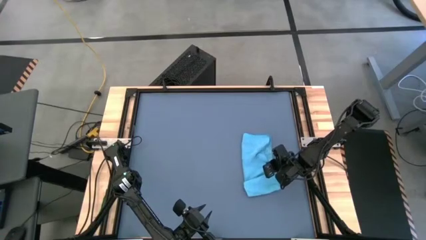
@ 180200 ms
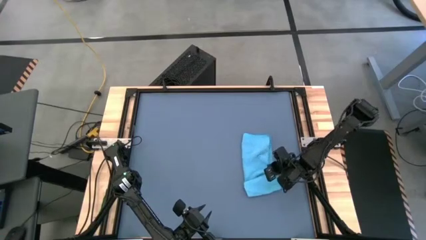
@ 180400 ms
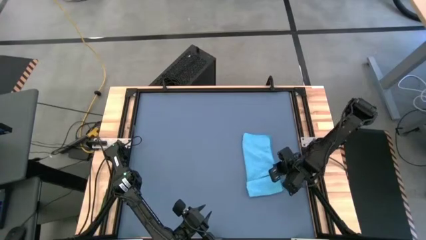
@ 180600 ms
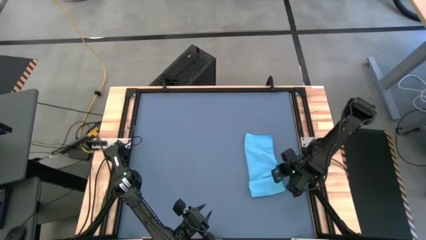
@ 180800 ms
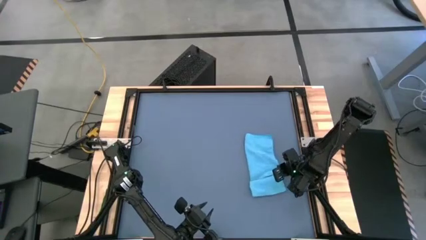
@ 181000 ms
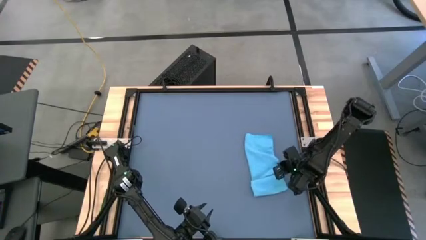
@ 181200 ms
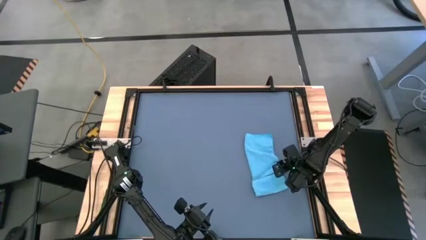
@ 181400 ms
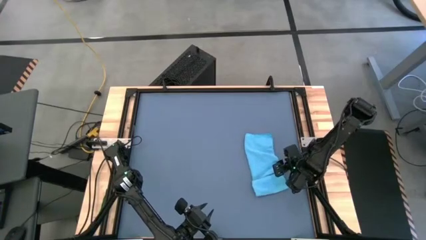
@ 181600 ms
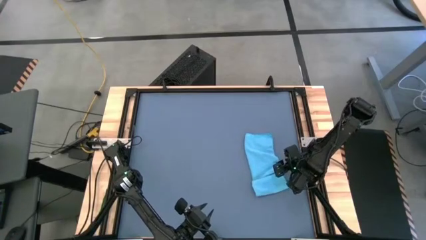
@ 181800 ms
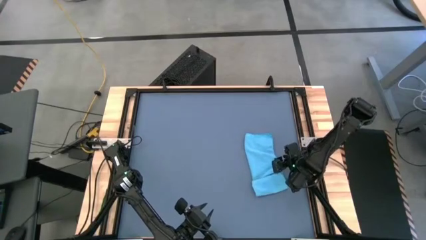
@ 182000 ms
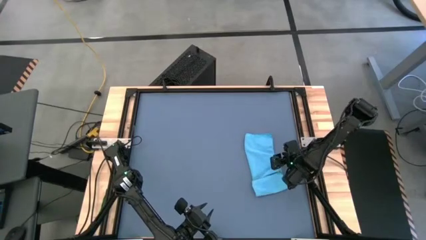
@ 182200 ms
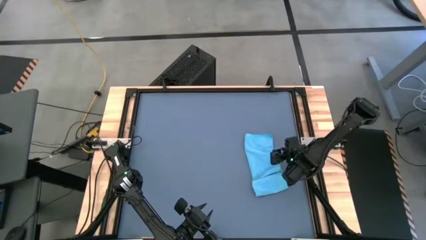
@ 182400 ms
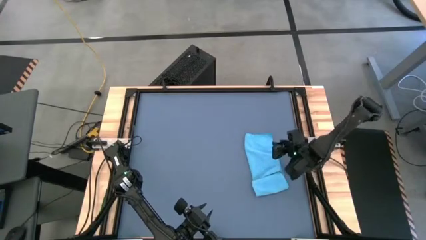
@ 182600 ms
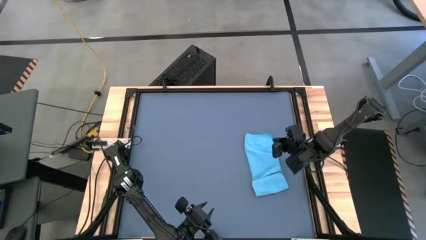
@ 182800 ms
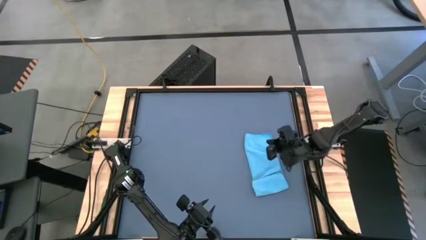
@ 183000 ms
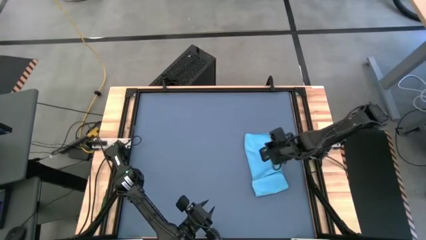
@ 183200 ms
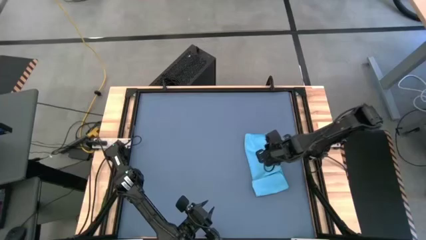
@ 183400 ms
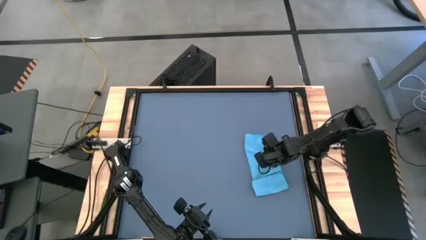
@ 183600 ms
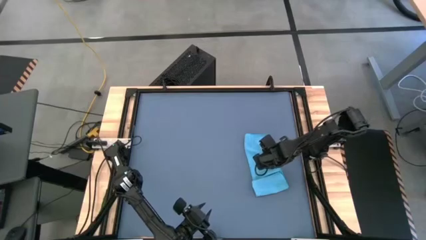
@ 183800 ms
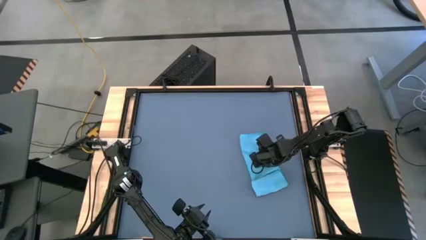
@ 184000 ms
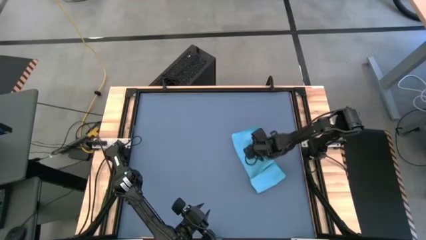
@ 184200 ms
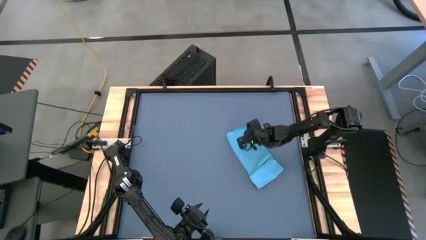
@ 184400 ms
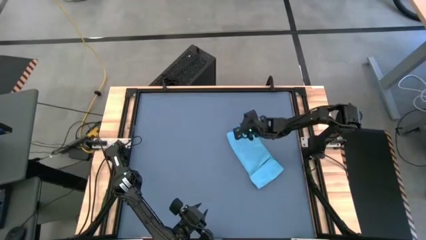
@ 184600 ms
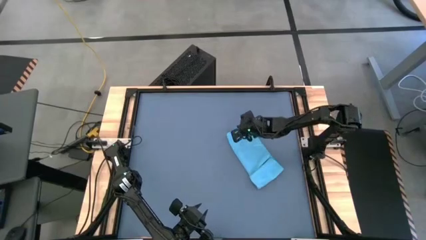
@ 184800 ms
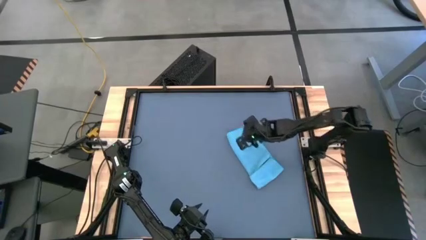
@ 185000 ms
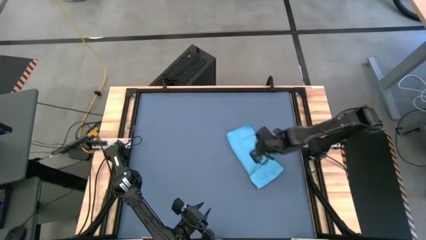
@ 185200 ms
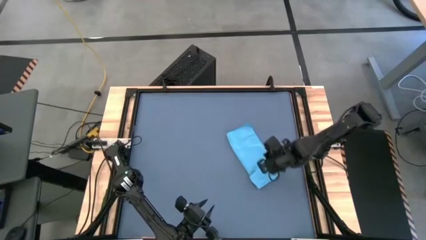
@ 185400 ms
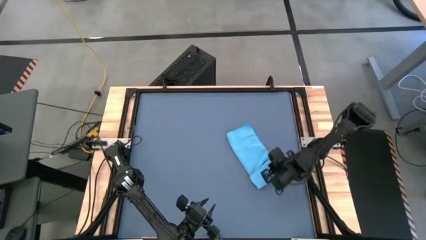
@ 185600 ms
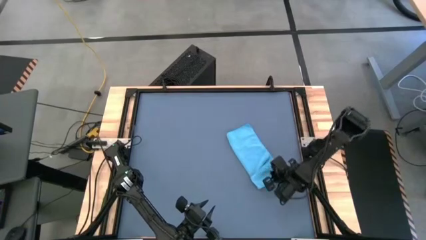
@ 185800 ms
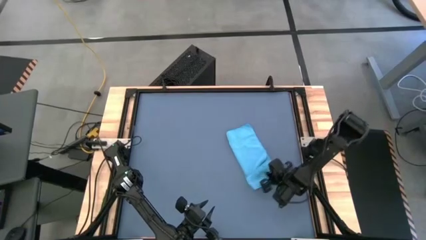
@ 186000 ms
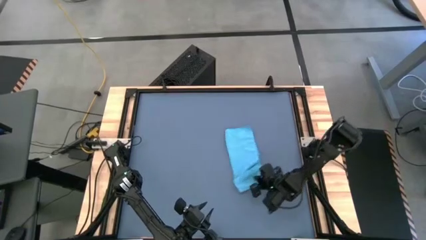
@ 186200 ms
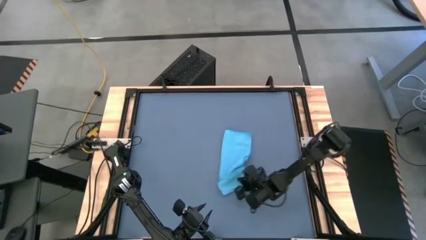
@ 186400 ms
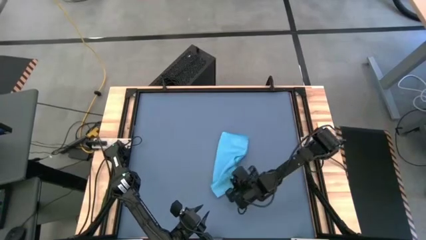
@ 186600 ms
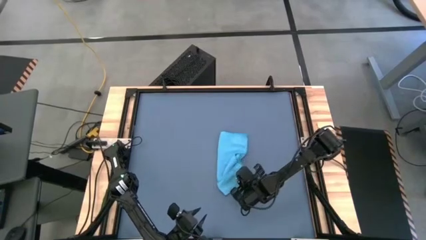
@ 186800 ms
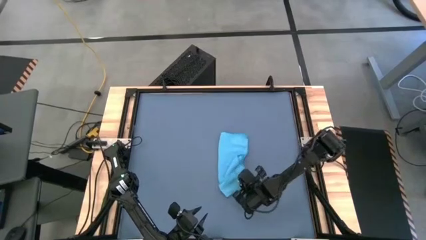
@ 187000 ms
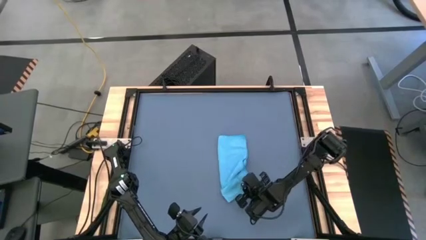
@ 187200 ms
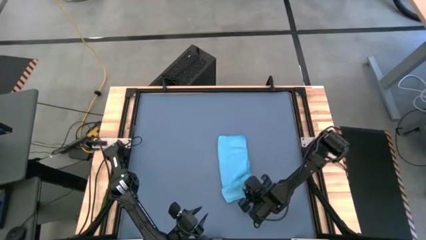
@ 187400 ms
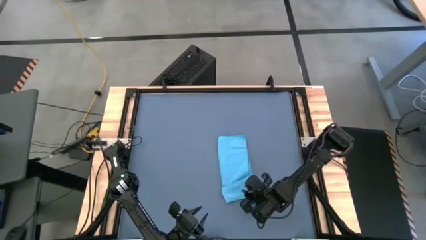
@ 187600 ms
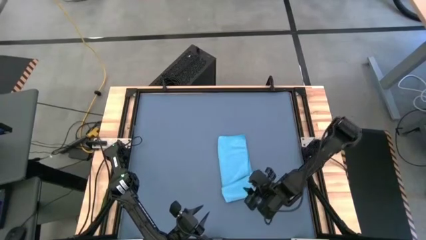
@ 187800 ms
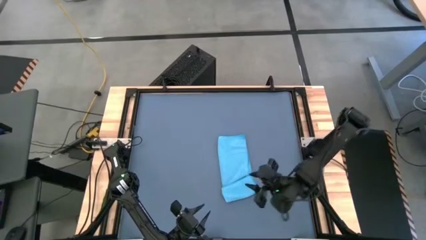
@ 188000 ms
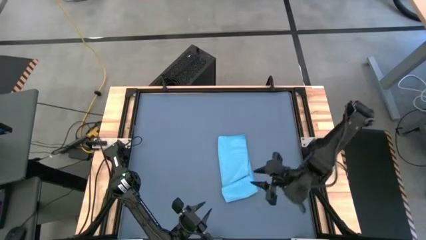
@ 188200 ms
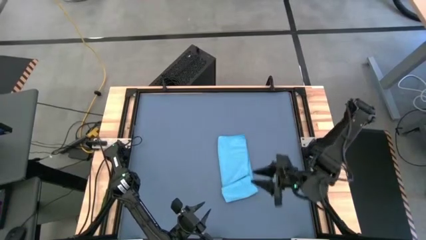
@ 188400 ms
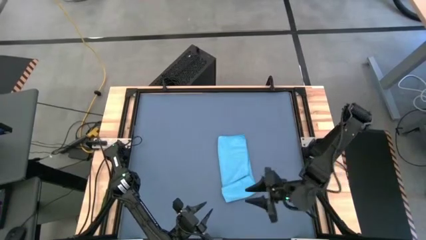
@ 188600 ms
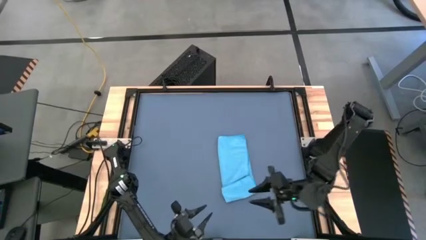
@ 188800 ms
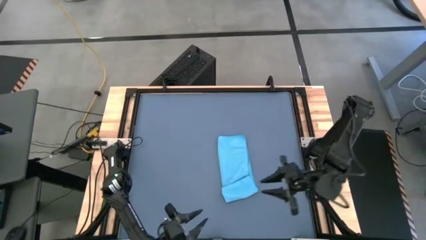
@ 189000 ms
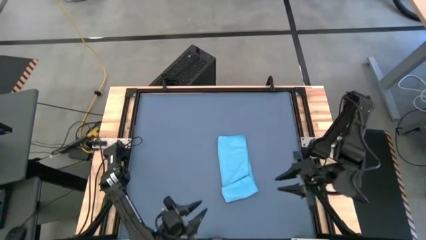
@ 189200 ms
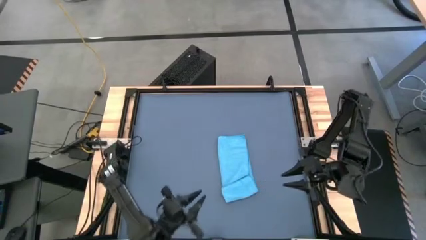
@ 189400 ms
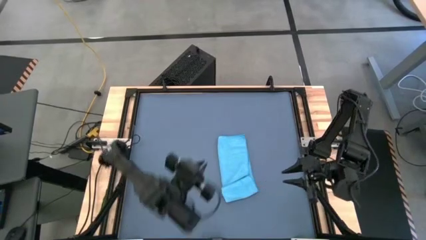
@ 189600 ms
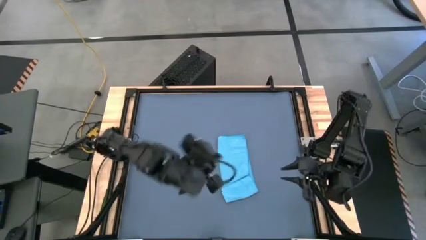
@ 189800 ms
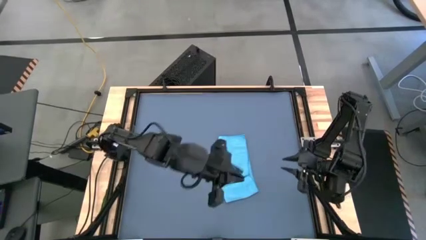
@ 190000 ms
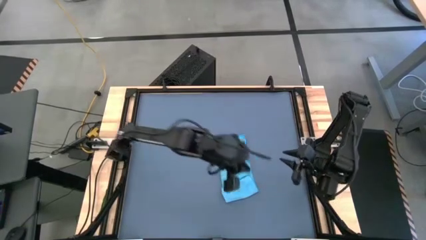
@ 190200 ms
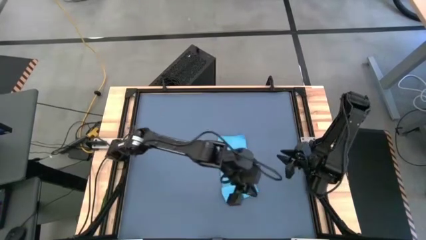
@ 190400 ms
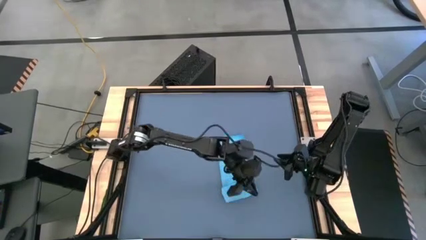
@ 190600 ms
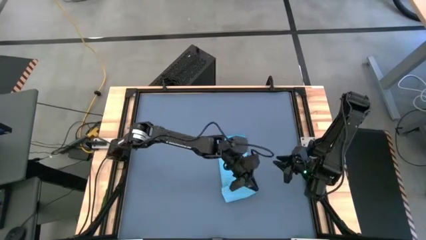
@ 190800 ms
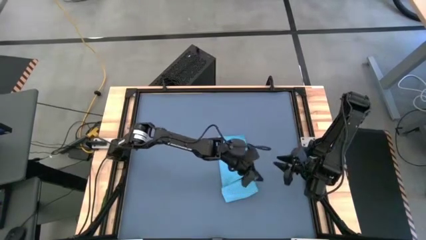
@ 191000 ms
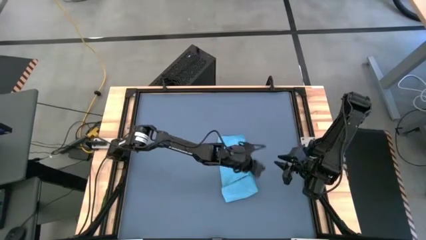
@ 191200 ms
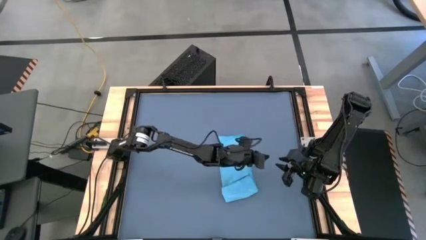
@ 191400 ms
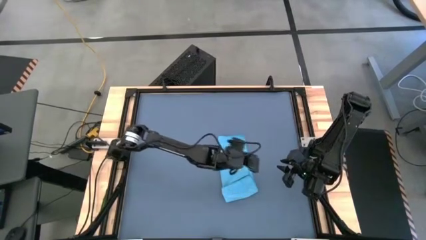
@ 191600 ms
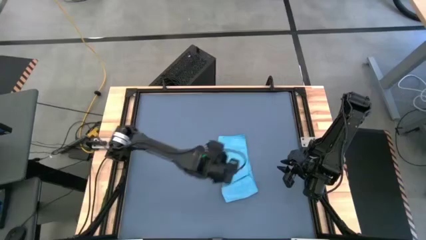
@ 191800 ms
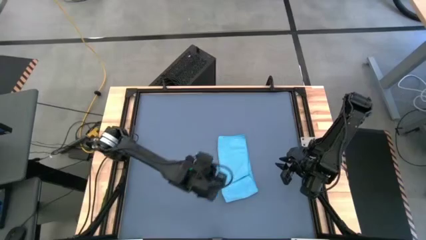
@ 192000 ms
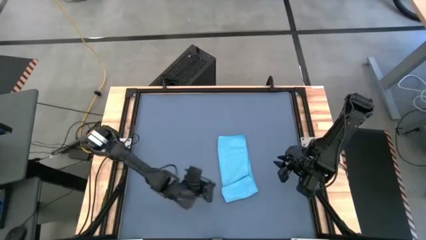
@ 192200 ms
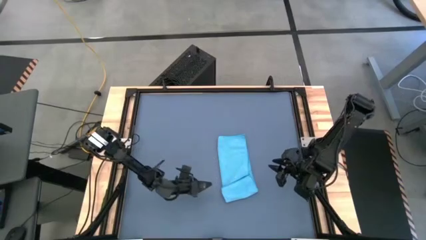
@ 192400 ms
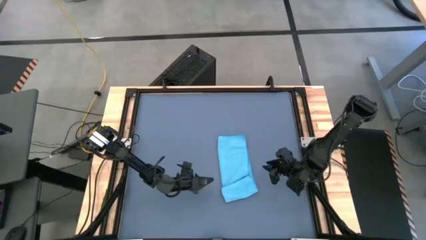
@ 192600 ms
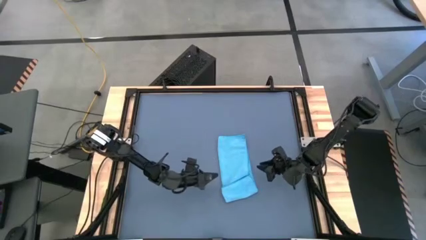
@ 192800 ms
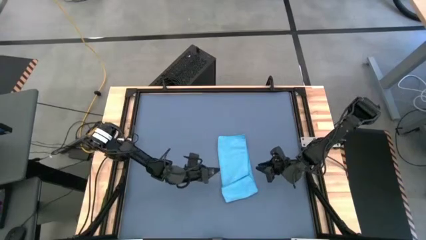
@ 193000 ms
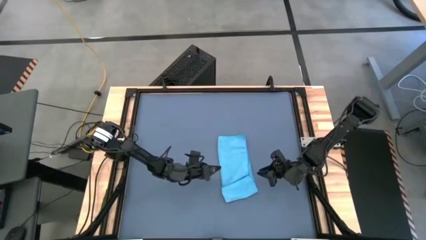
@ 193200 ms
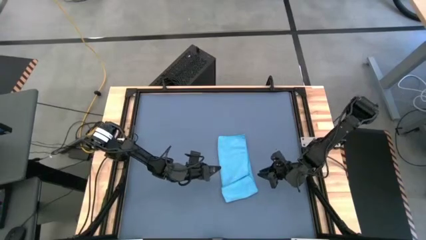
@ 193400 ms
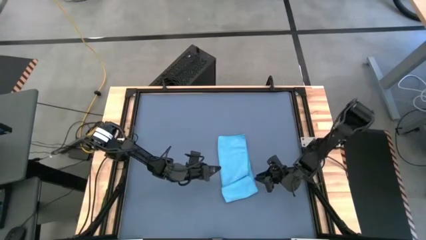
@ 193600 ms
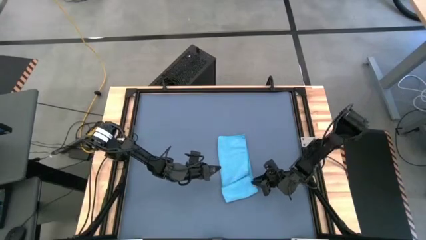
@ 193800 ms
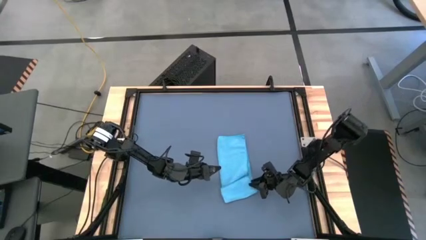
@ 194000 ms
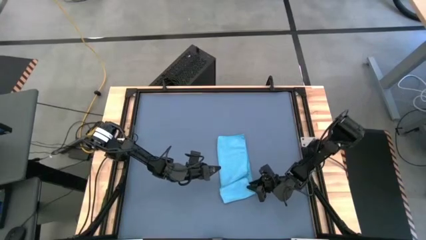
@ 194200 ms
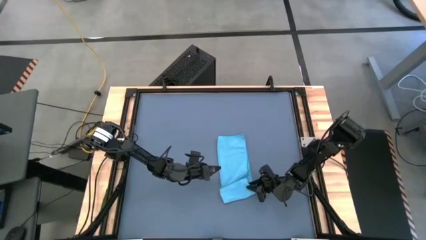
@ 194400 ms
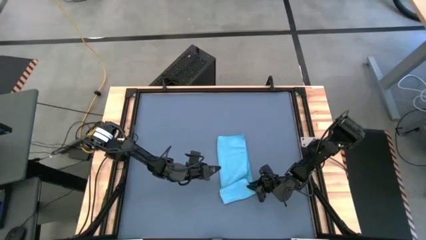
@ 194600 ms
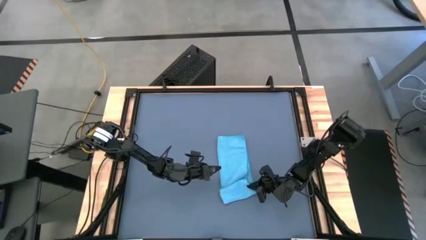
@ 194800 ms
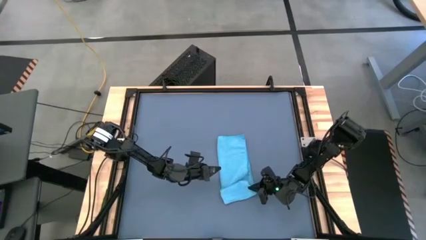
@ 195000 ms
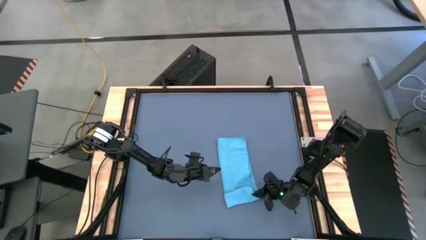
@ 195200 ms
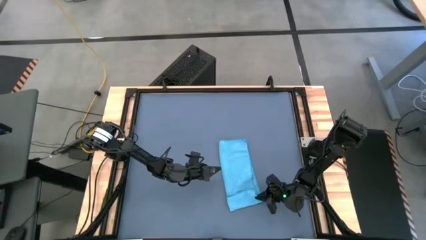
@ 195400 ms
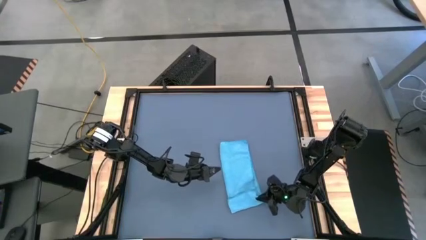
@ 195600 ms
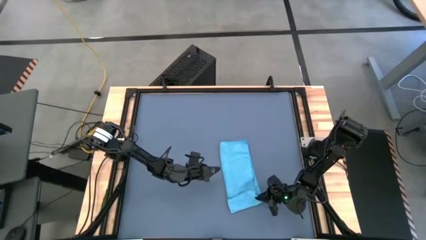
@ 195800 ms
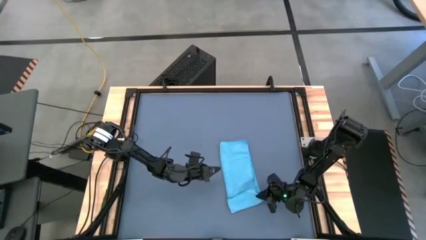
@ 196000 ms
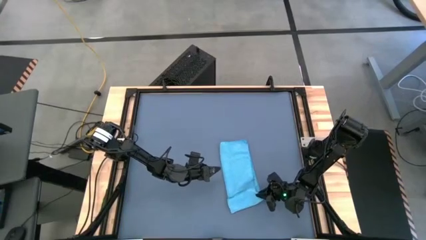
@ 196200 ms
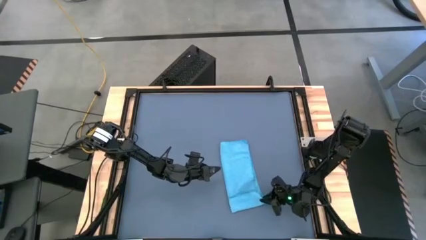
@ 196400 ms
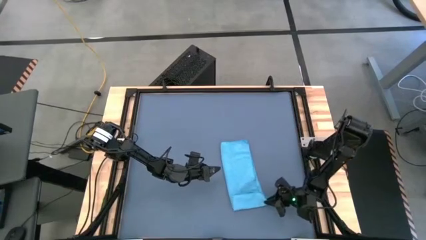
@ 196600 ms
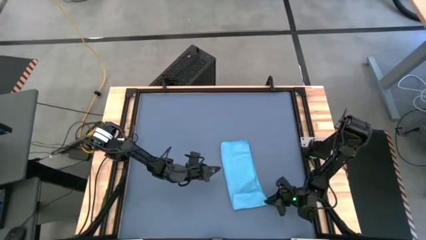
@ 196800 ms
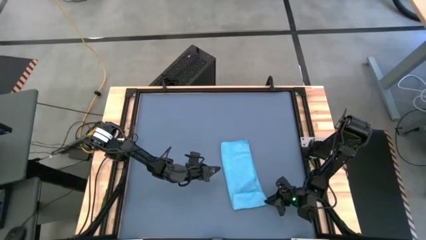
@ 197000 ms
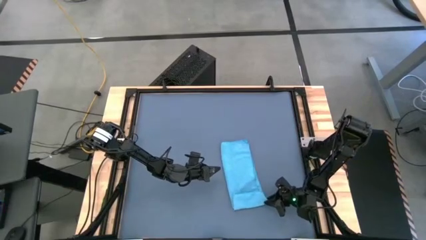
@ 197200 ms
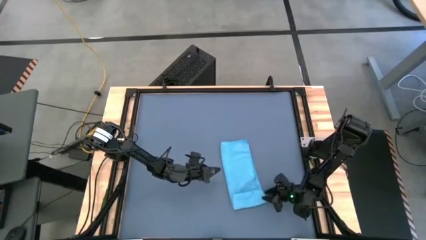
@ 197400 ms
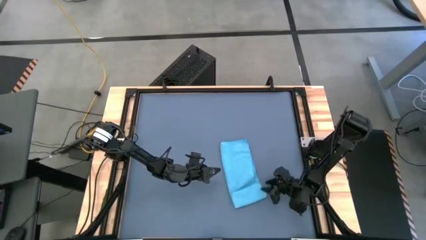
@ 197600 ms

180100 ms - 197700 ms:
Task: Roll towel
Roll the blue microfiber towel
